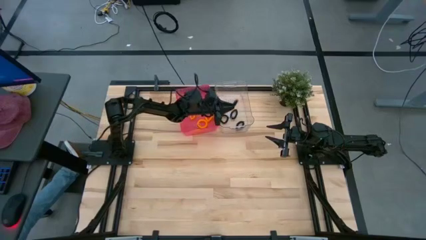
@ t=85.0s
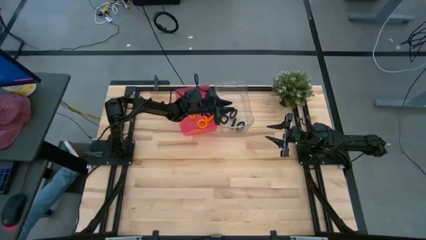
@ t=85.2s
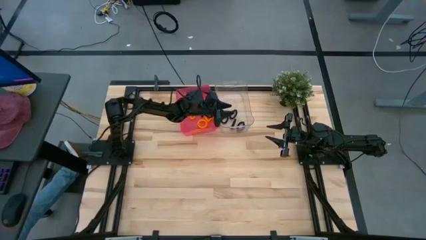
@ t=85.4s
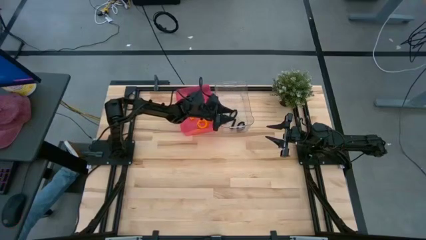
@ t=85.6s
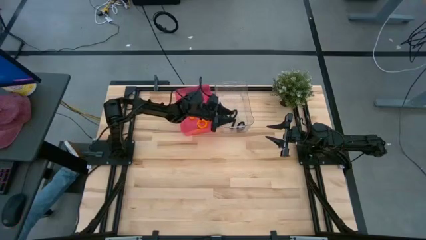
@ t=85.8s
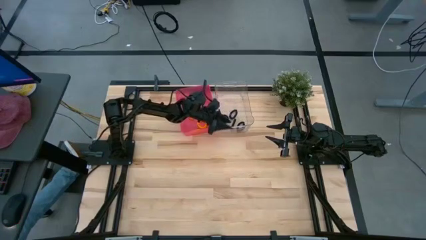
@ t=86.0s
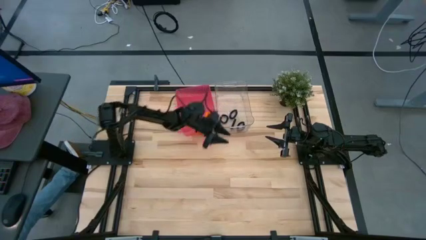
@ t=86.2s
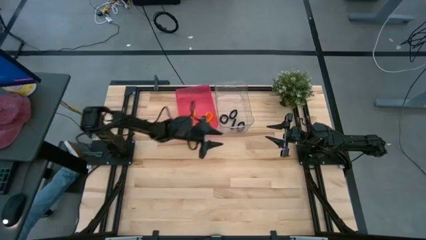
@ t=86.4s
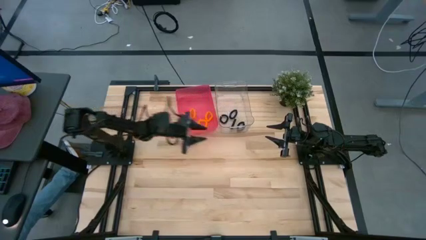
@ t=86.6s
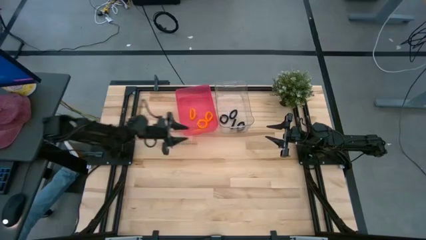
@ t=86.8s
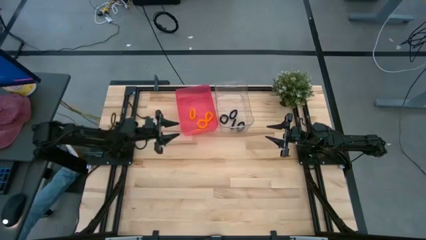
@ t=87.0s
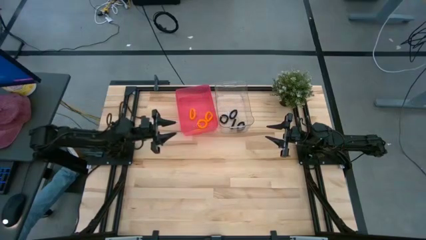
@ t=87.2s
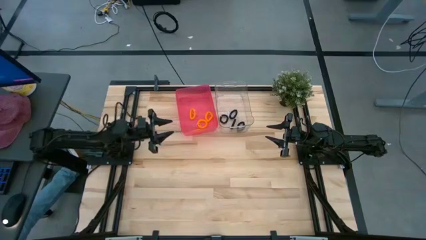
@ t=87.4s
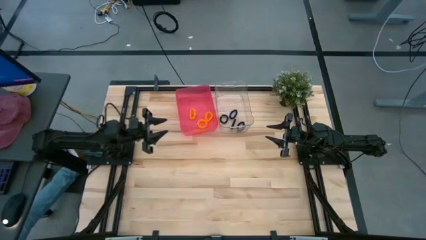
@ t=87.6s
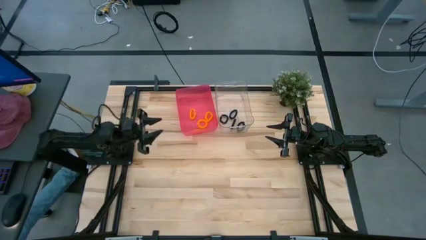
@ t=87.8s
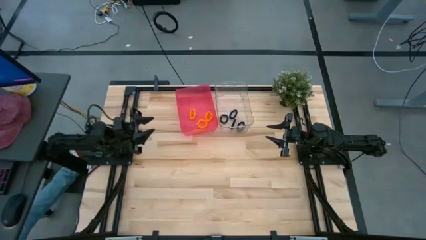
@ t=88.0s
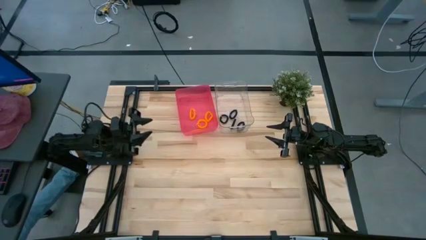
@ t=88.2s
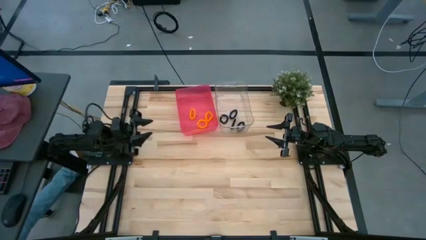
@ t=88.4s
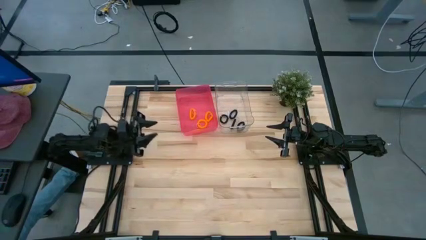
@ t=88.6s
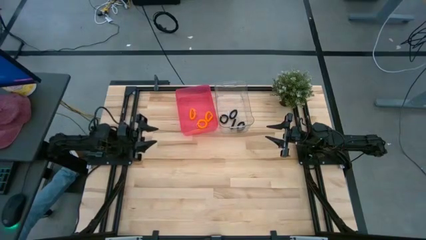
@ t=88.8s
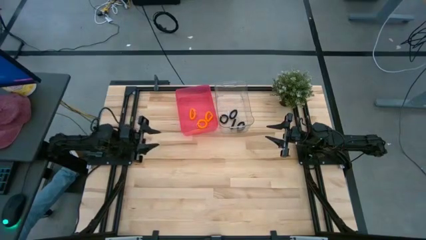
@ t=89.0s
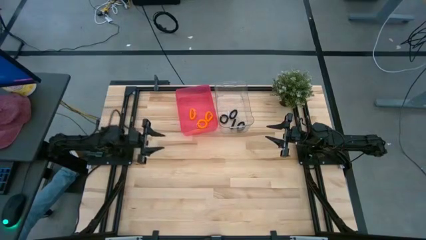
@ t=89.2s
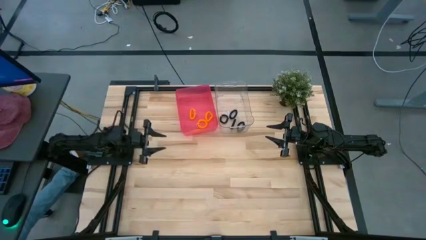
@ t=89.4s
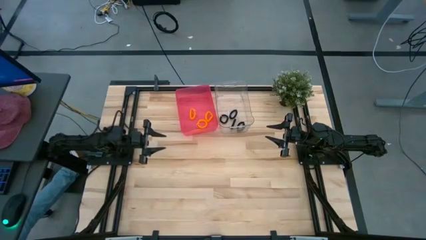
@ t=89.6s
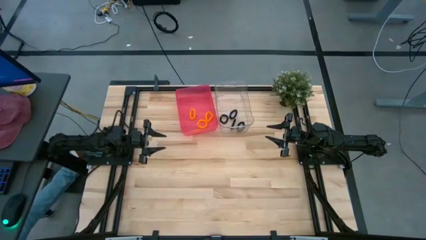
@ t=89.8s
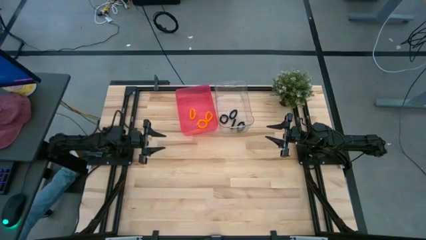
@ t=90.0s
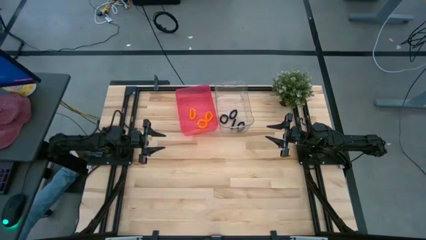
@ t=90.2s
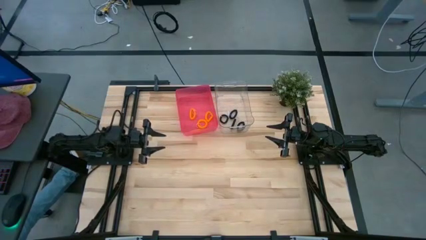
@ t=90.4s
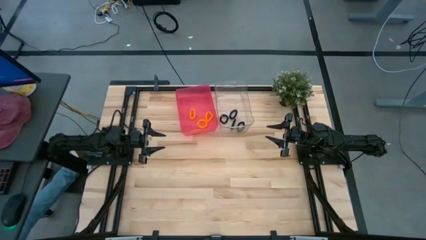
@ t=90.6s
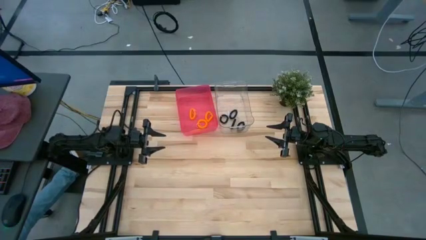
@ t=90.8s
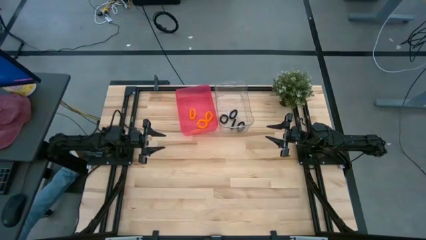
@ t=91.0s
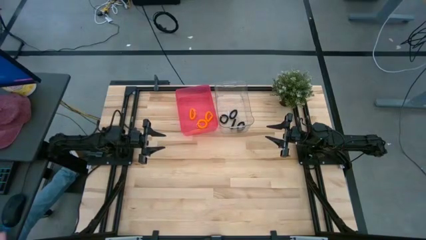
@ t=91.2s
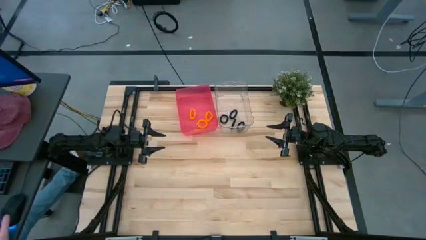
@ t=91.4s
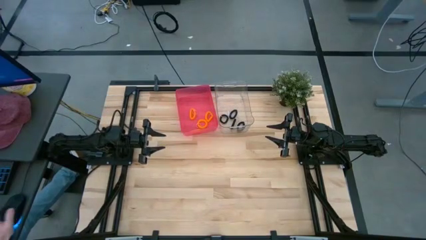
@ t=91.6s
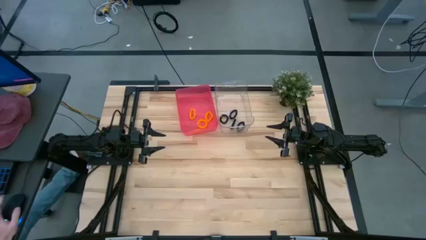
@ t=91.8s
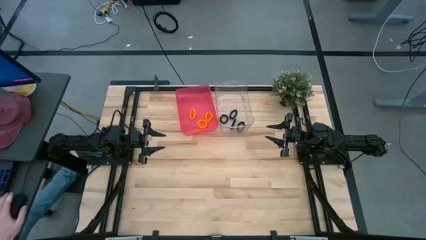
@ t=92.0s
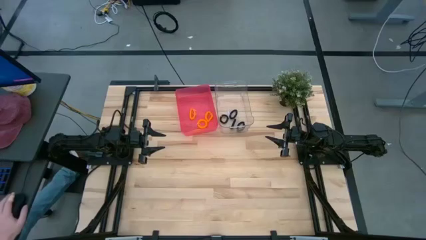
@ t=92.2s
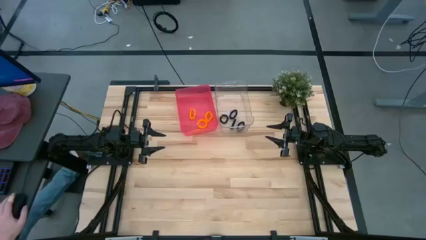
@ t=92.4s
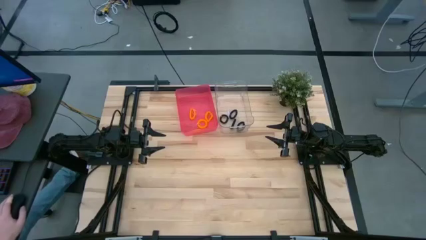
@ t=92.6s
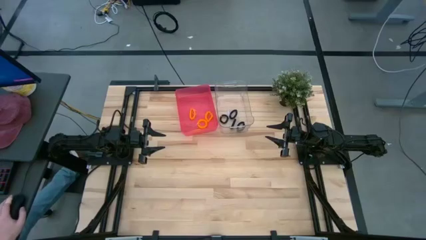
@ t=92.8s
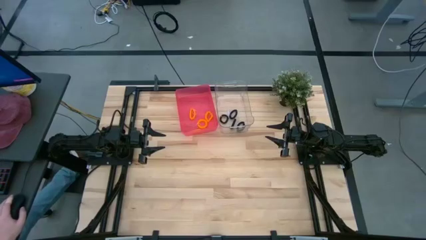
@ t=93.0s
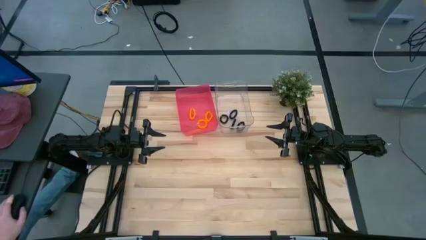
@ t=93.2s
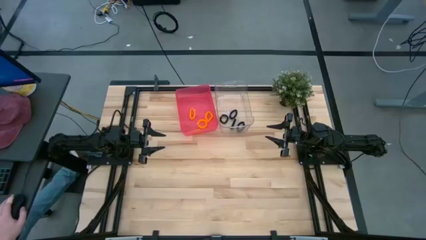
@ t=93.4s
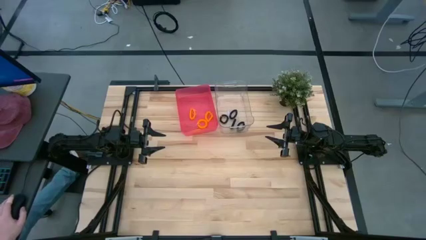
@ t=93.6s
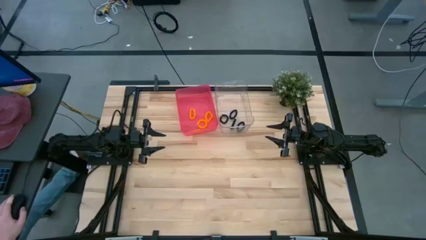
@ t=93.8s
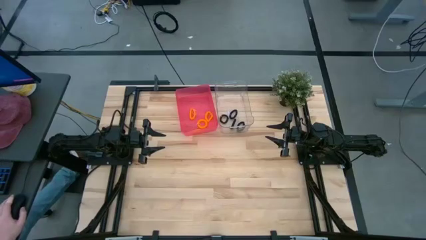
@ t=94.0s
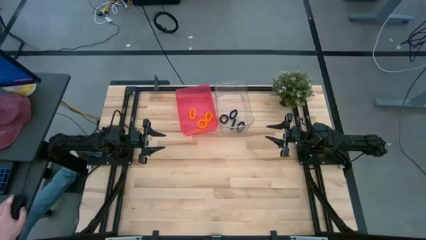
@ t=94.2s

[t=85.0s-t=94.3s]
Task: Sort spring keychains
Return to Home Position
